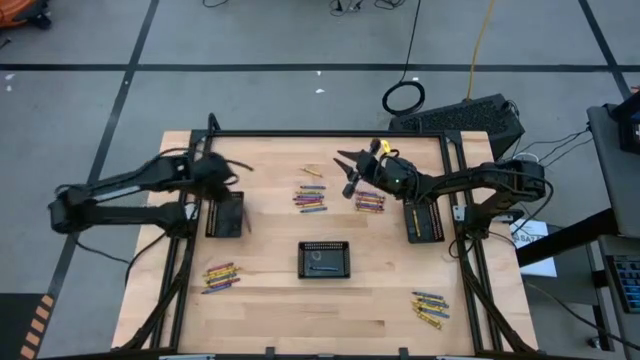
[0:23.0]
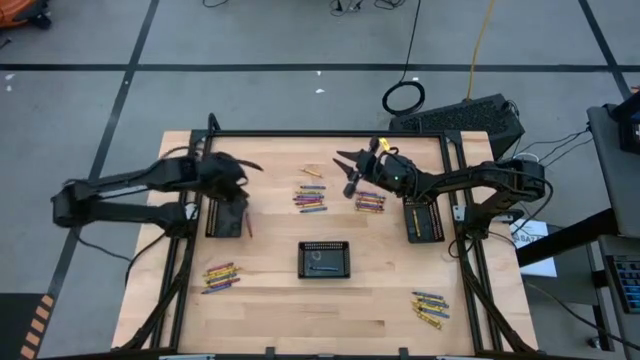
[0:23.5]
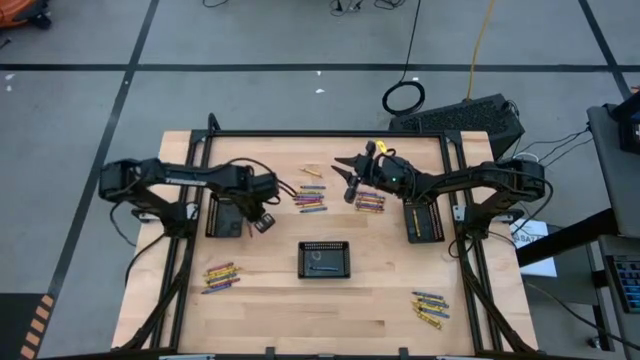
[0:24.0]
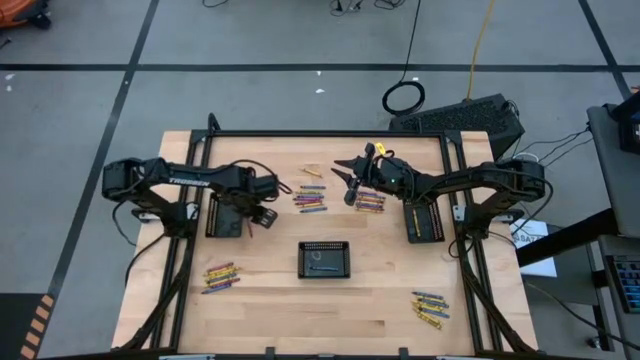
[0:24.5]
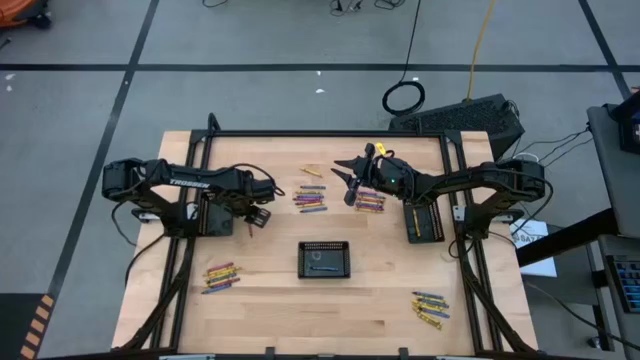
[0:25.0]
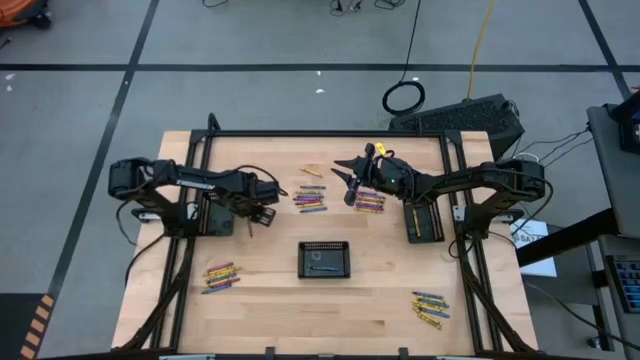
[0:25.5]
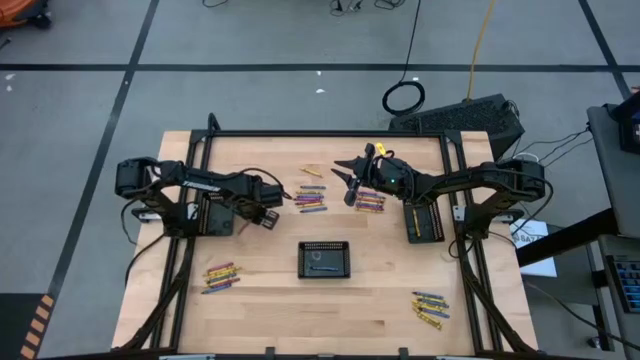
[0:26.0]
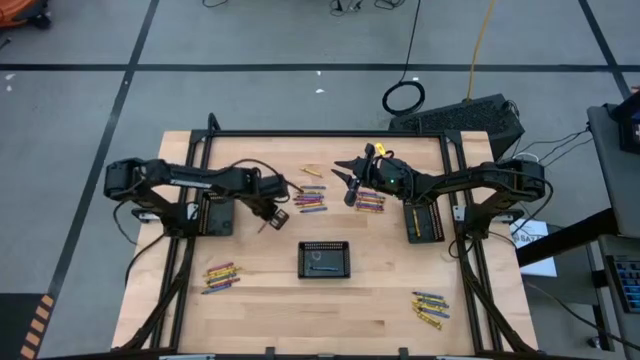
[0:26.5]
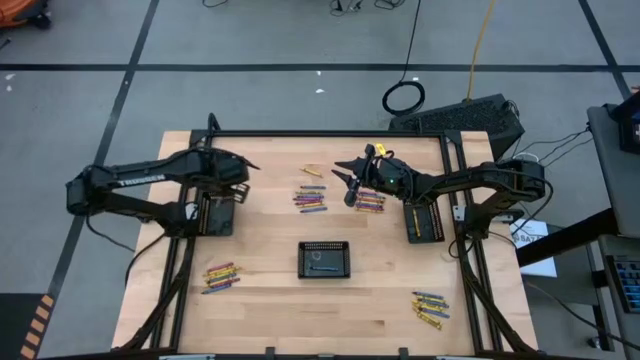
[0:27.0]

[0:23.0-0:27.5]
Task: Sort crayons
Put the red crayon into the left black basket

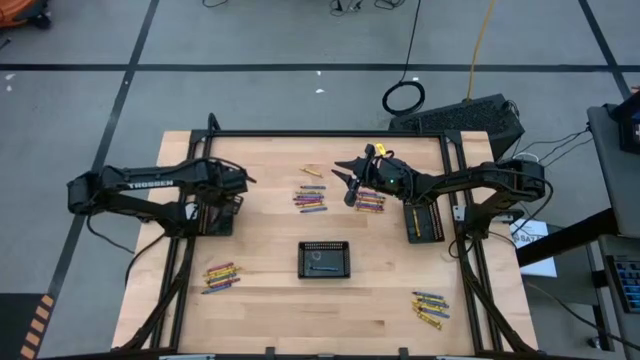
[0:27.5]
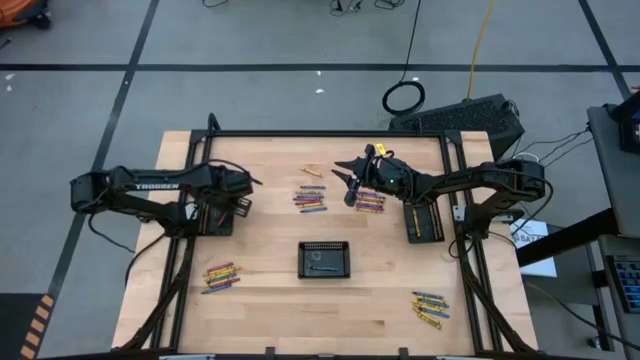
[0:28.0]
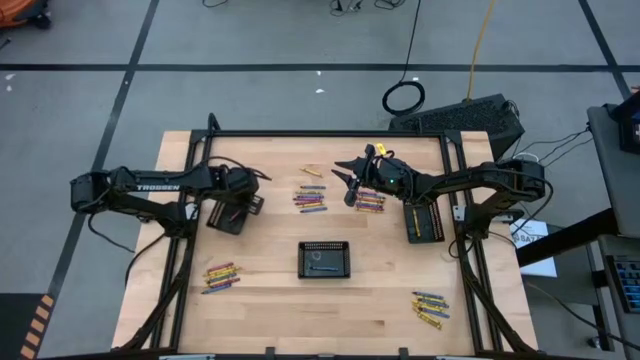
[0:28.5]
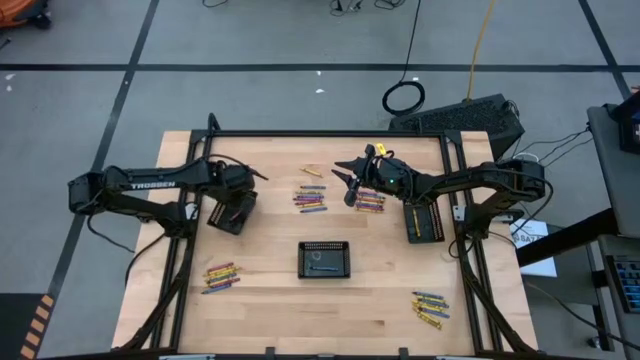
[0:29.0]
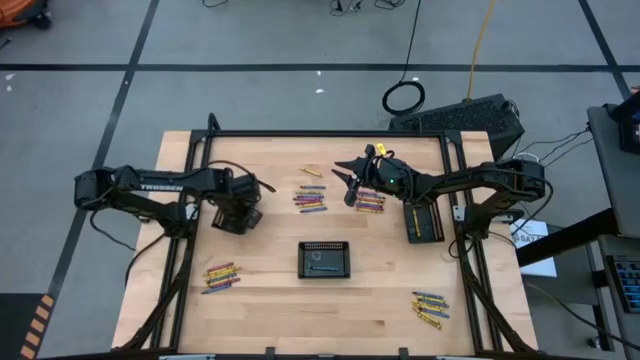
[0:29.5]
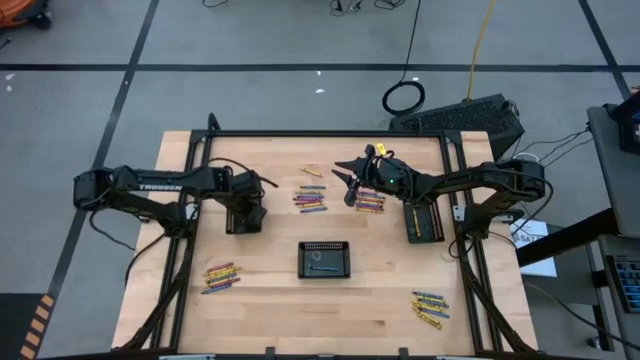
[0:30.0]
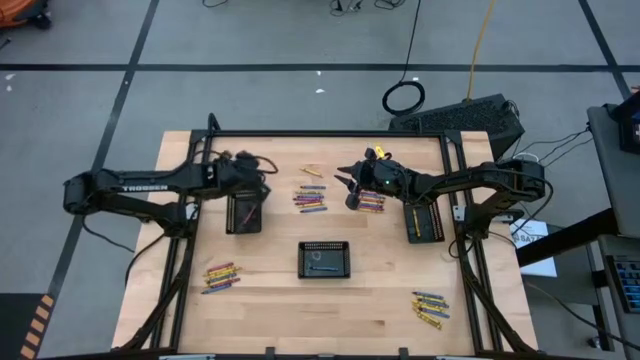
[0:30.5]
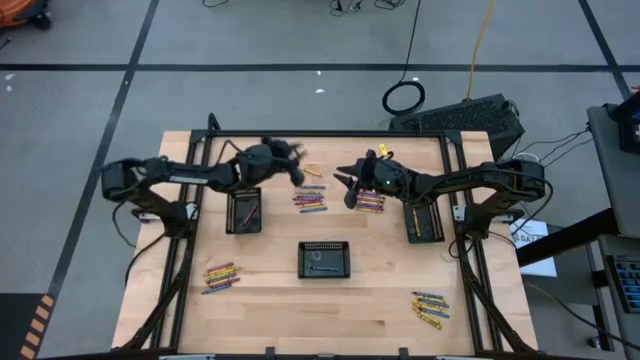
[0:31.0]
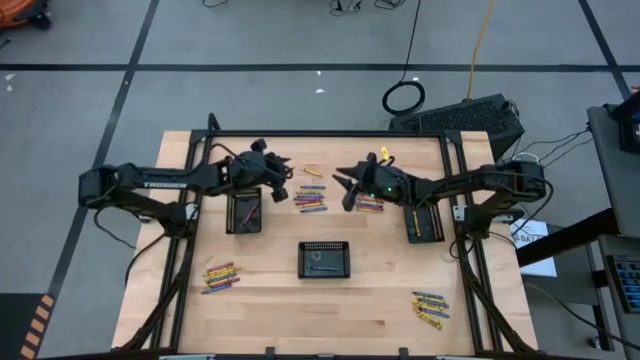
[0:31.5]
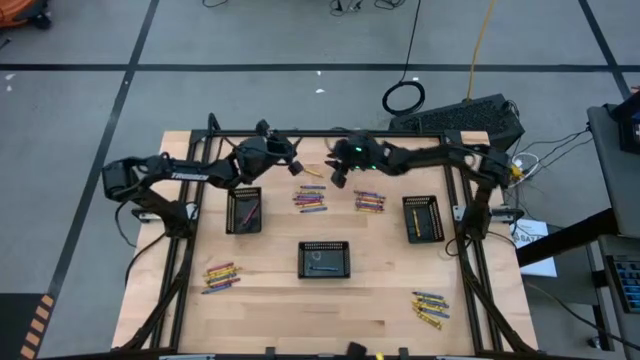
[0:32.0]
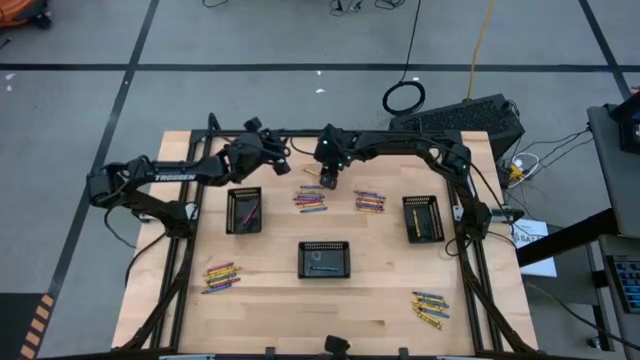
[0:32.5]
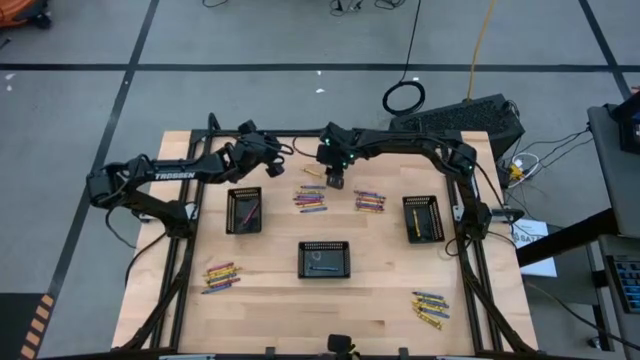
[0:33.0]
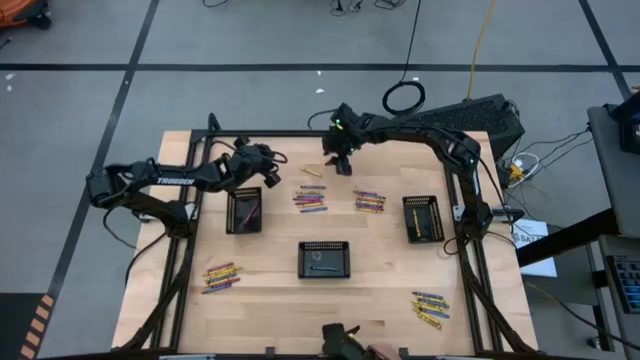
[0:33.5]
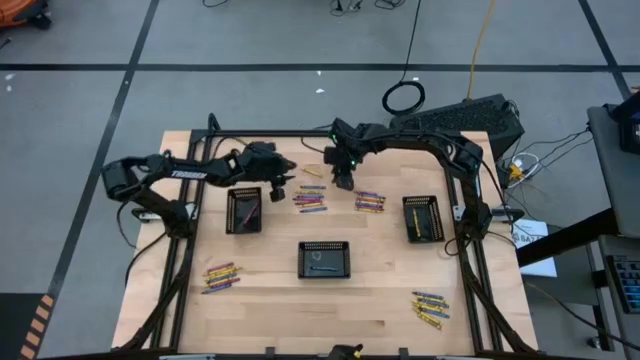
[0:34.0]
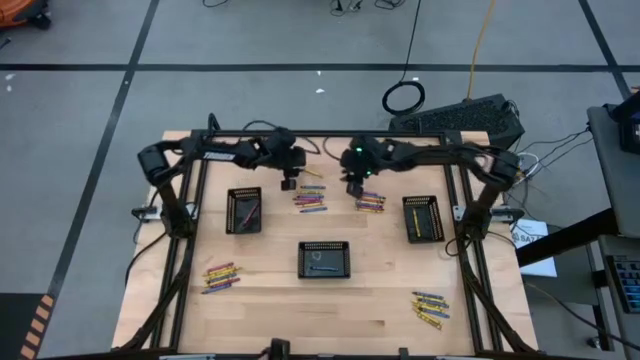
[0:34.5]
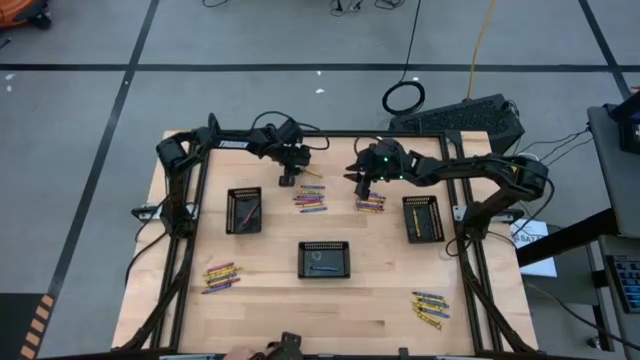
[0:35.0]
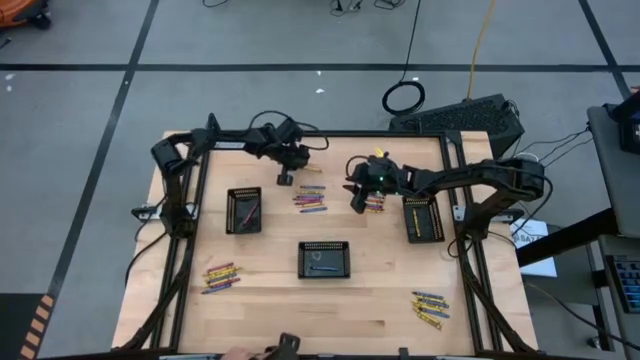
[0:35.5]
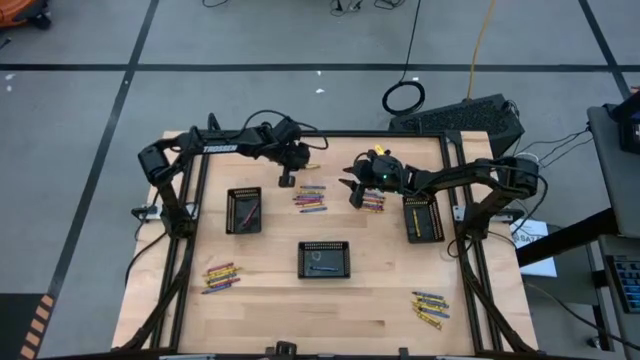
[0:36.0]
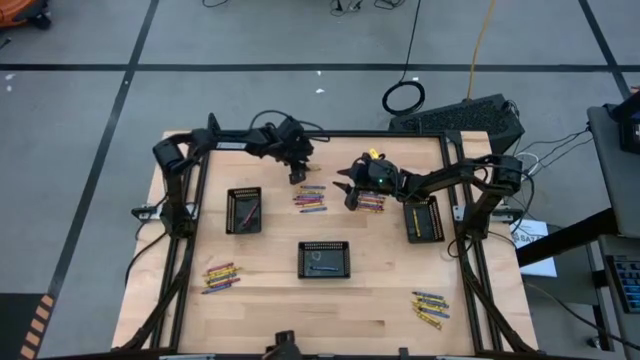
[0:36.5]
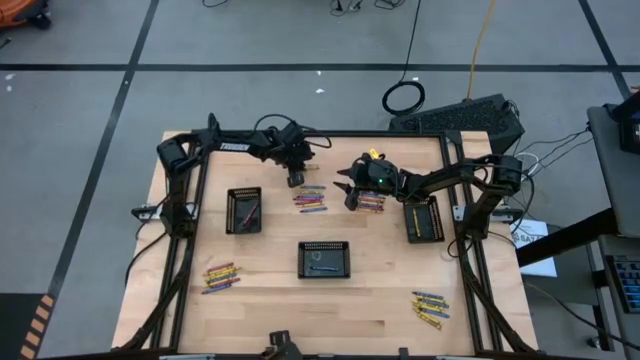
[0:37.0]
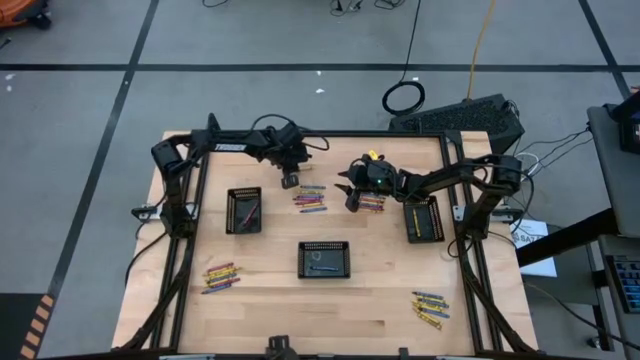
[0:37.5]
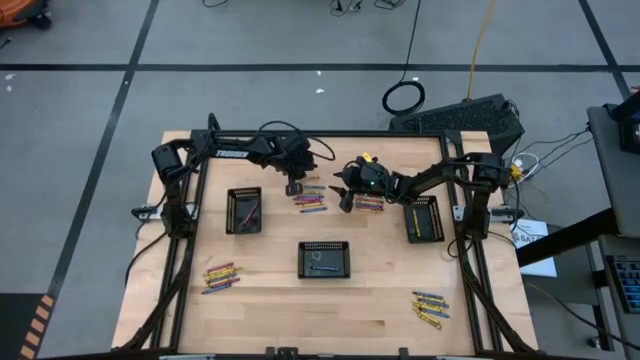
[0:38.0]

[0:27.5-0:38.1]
Put the yellow crayon into the right black basket

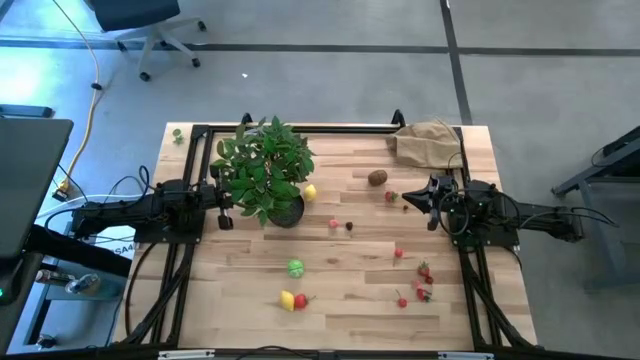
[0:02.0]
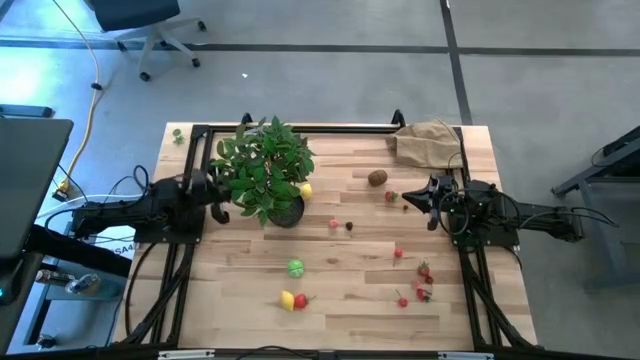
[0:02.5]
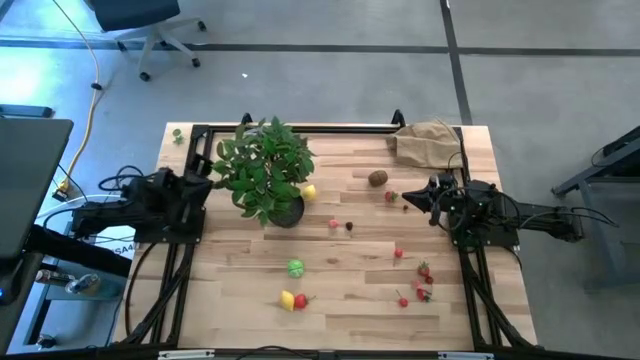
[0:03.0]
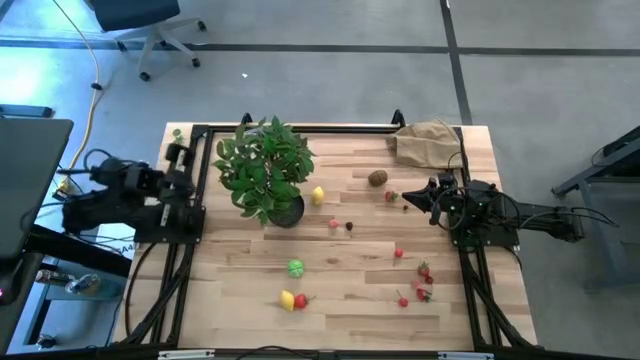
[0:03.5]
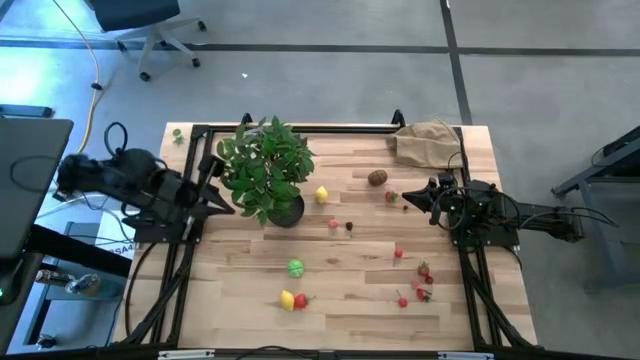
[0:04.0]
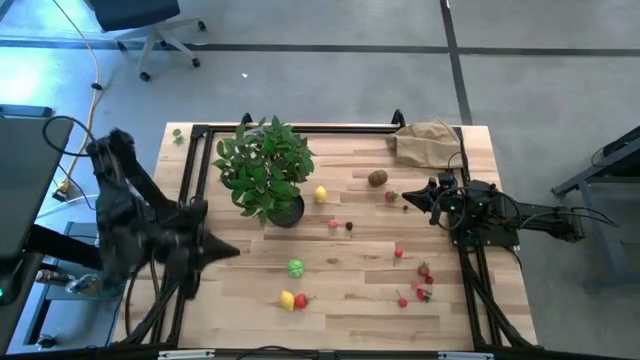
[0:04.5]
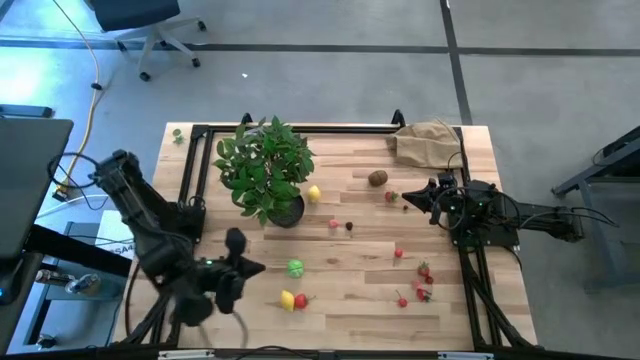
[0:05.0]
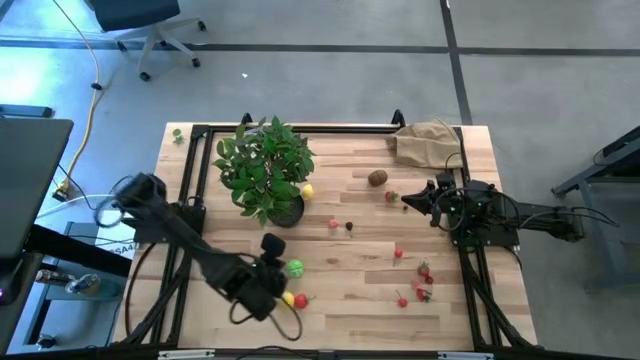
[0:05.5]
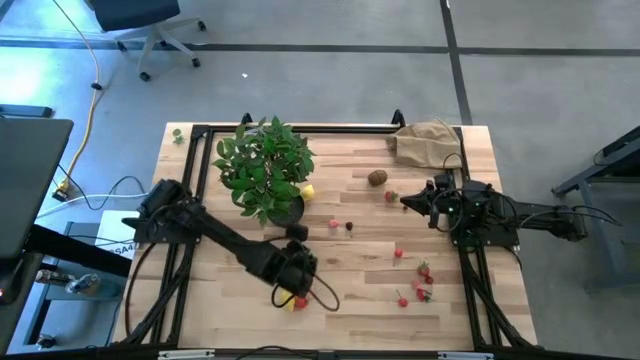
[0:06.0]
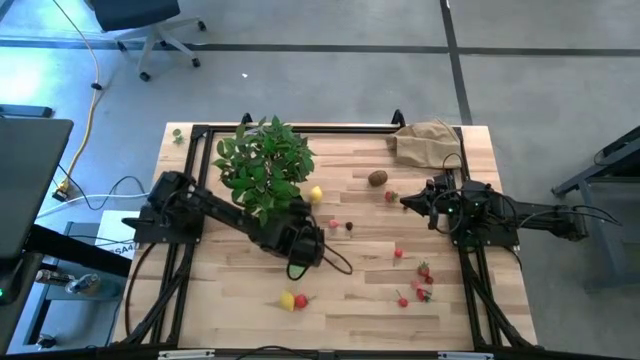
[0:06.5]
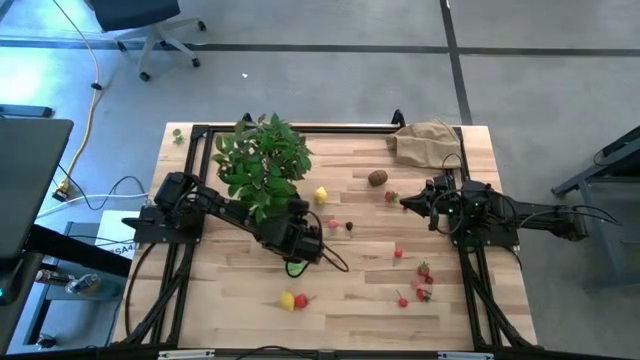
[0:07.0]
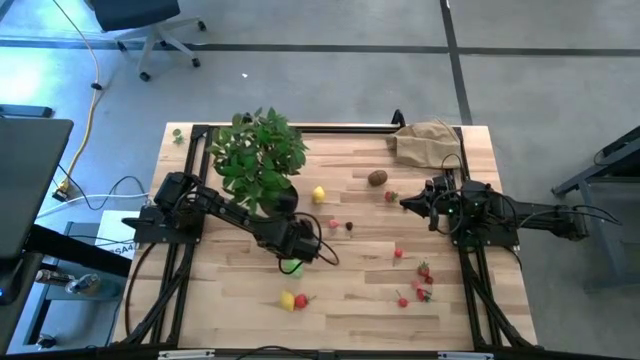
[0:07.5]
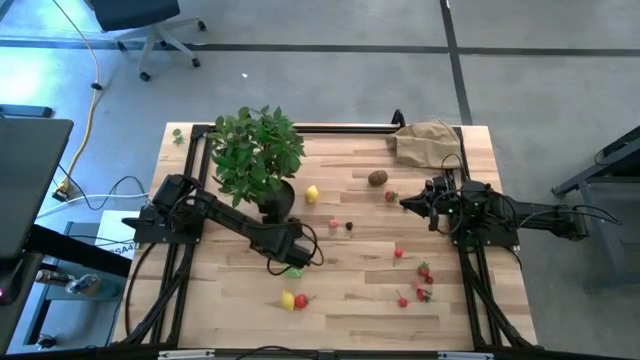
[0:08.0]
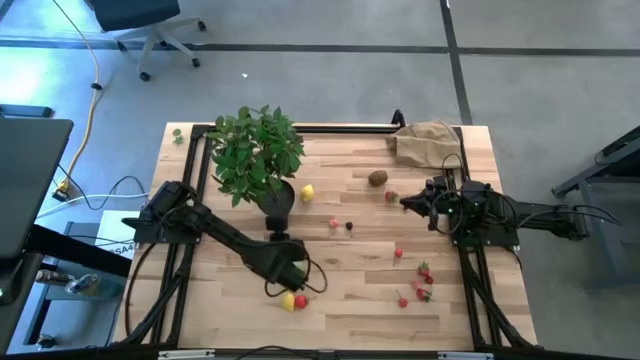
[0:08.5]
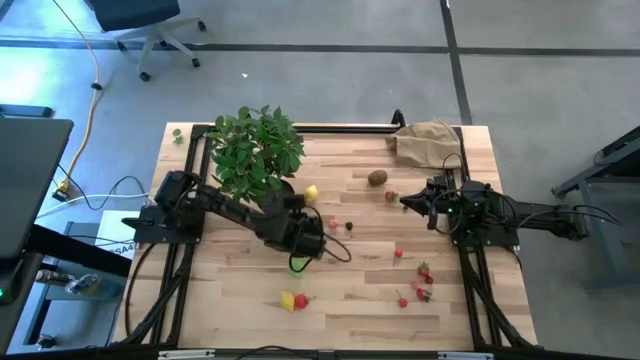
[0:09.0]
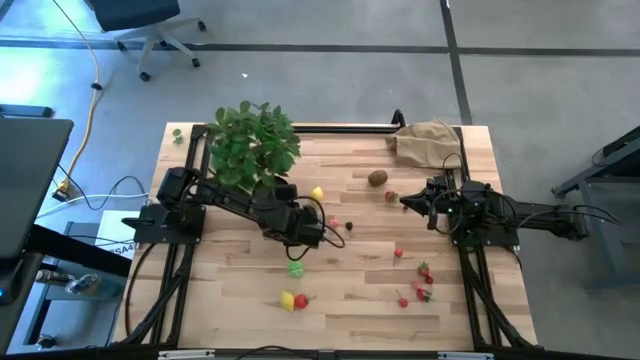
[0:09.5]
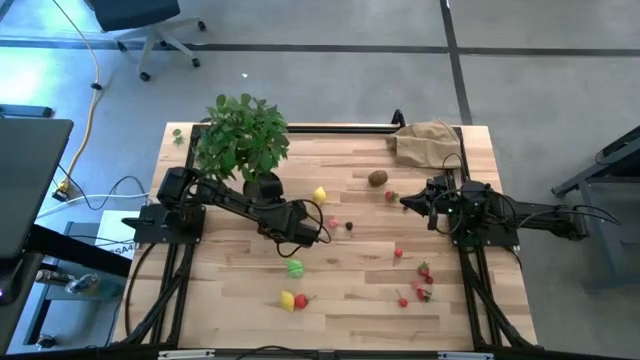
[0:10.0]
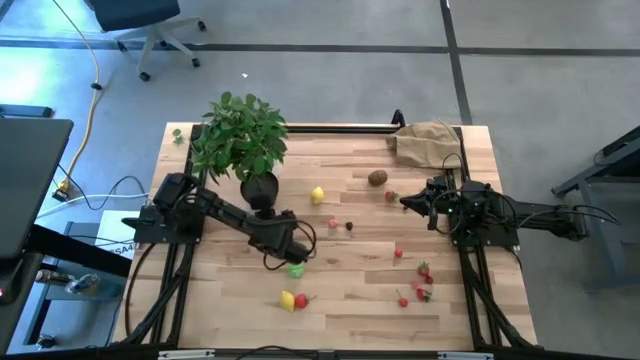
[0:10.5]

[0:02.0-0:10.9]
Task: Pick and placing Produce into tupperware
Adjust the potted plant
